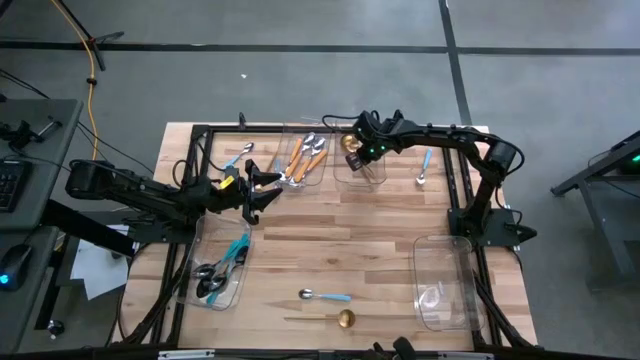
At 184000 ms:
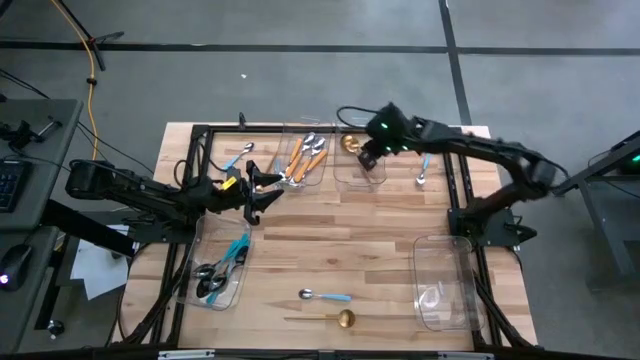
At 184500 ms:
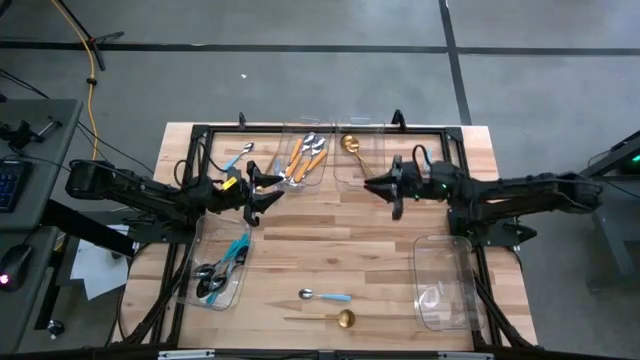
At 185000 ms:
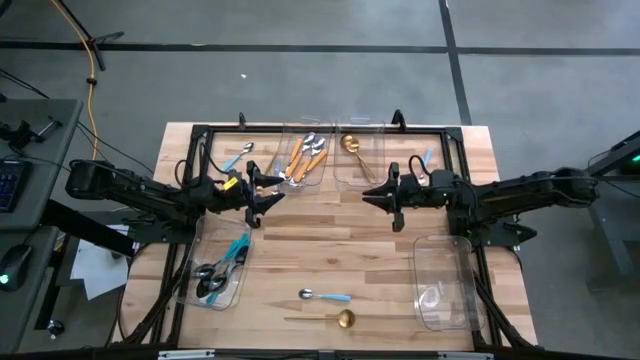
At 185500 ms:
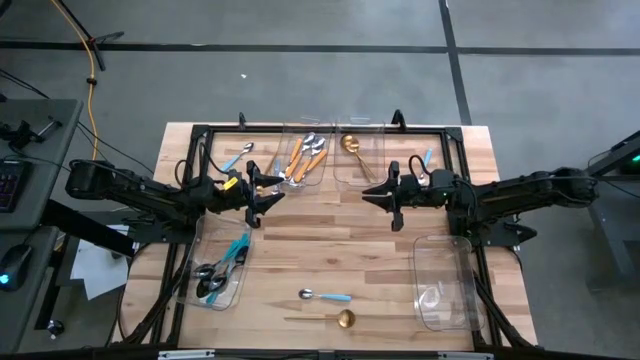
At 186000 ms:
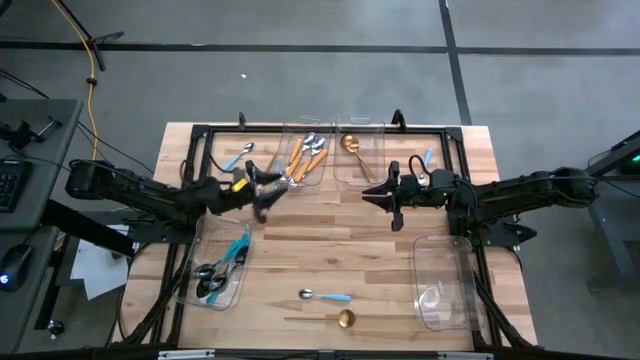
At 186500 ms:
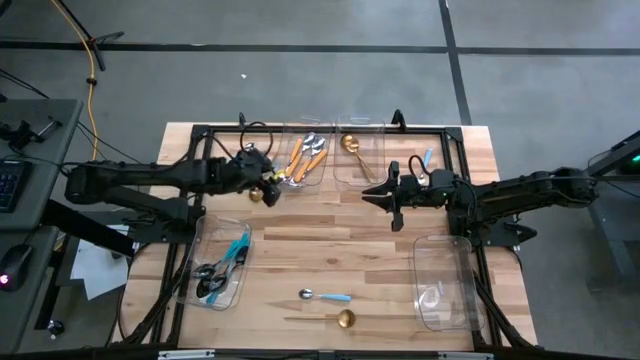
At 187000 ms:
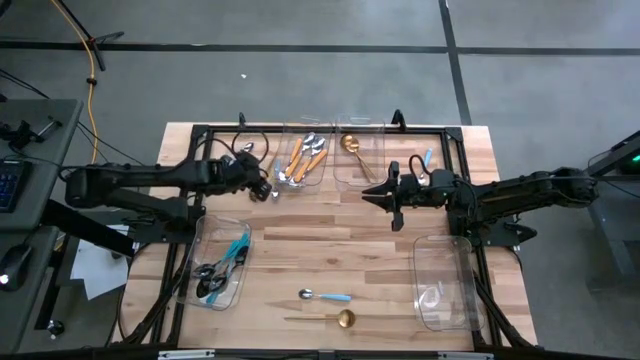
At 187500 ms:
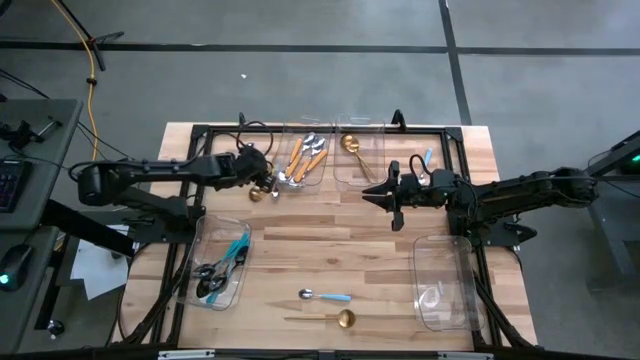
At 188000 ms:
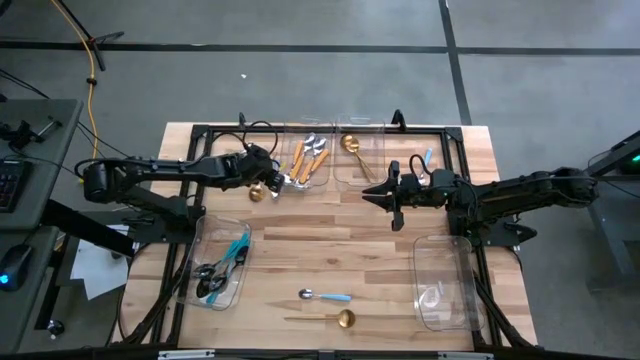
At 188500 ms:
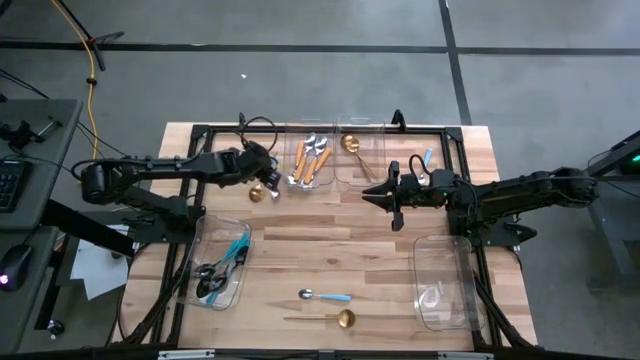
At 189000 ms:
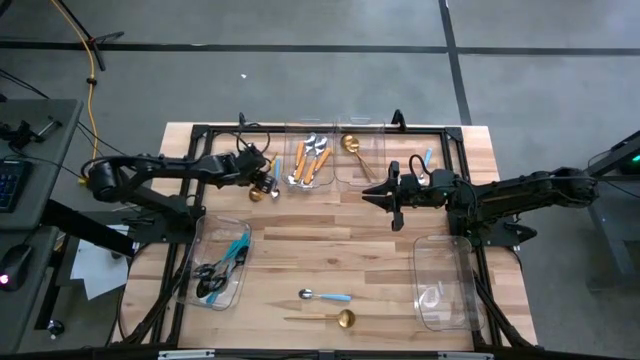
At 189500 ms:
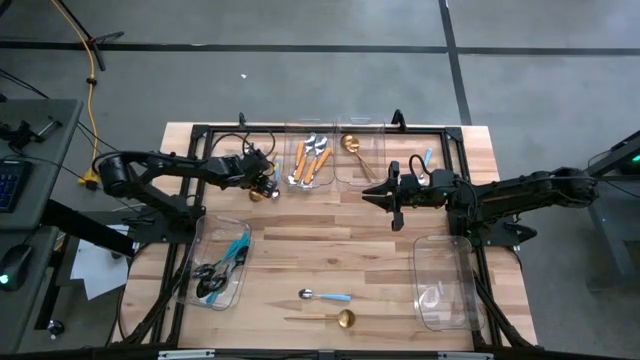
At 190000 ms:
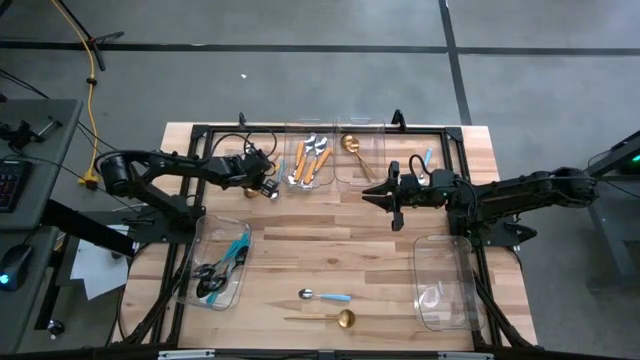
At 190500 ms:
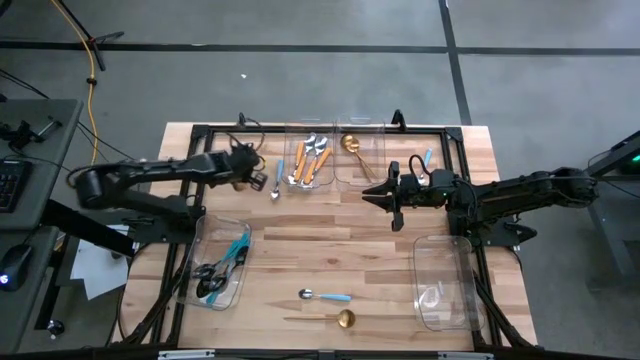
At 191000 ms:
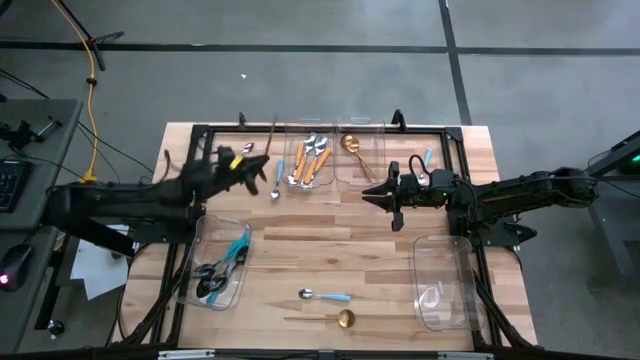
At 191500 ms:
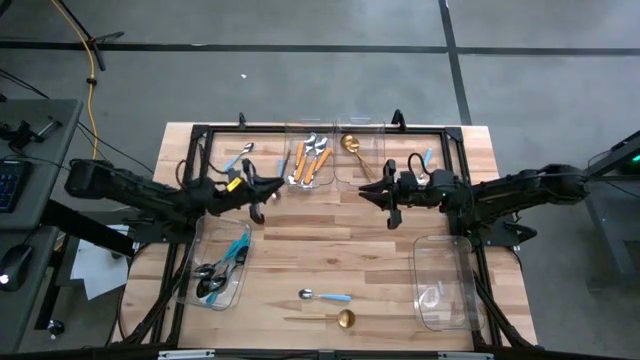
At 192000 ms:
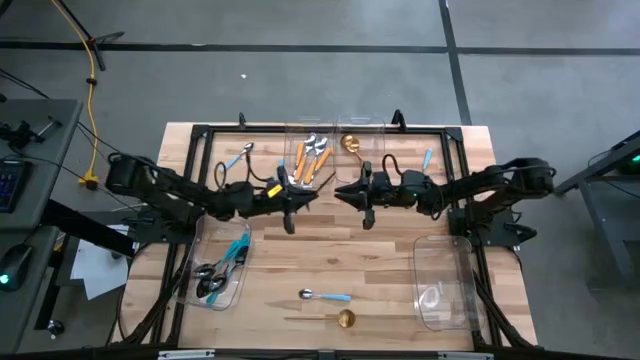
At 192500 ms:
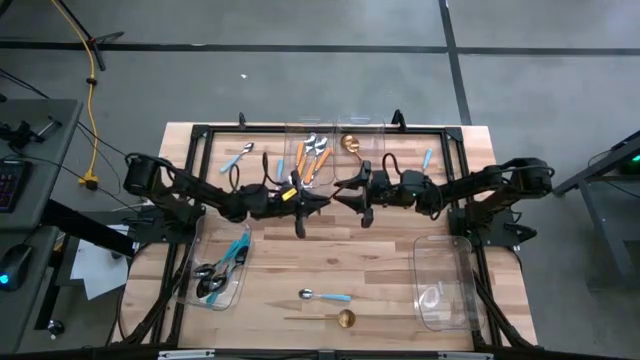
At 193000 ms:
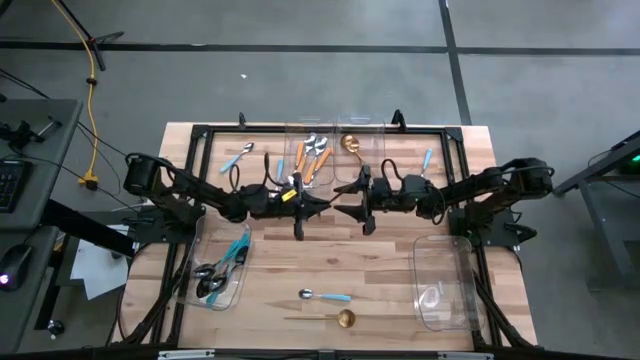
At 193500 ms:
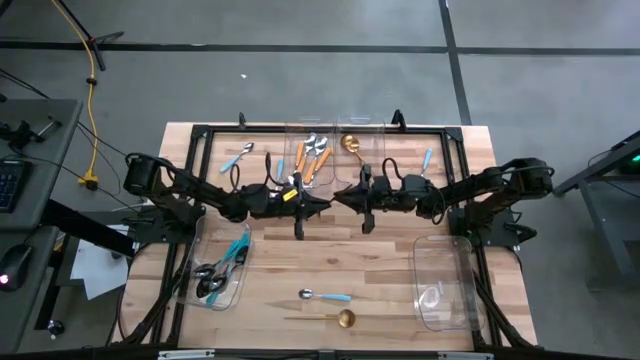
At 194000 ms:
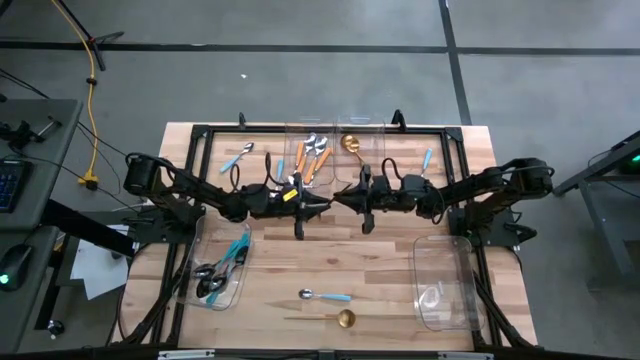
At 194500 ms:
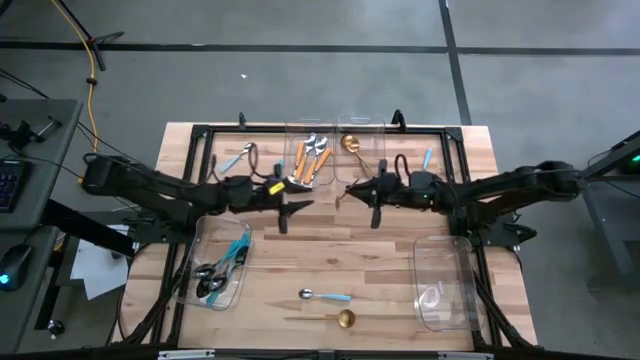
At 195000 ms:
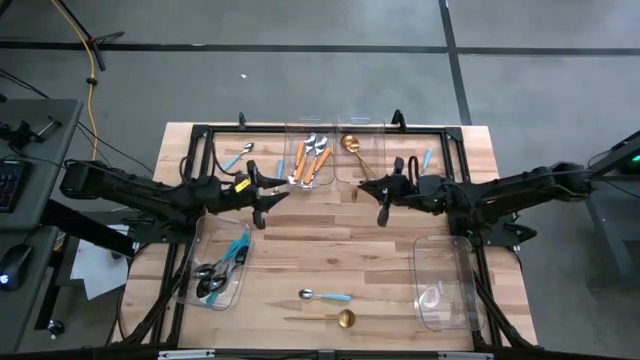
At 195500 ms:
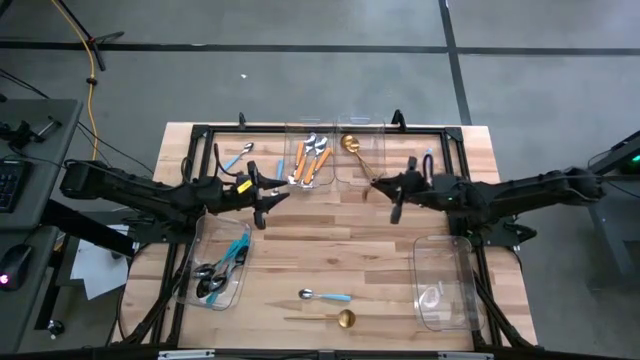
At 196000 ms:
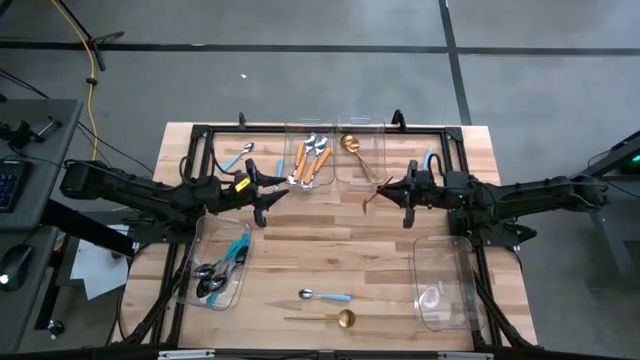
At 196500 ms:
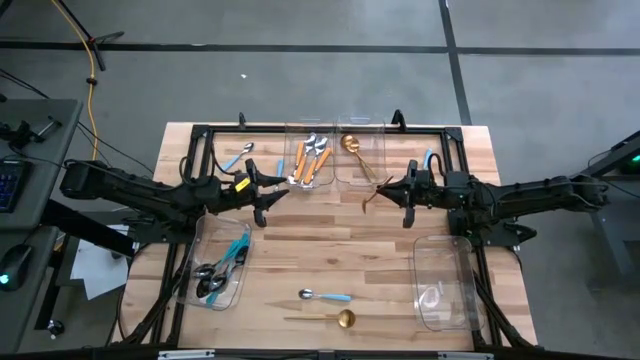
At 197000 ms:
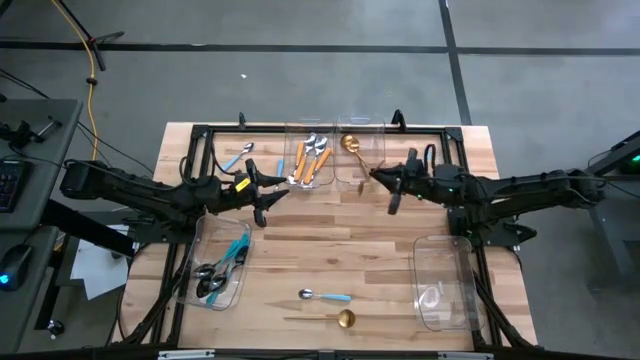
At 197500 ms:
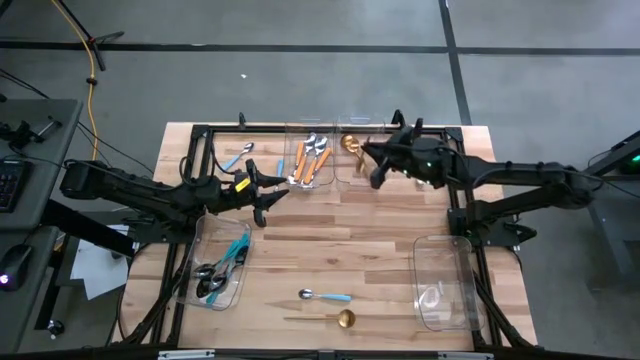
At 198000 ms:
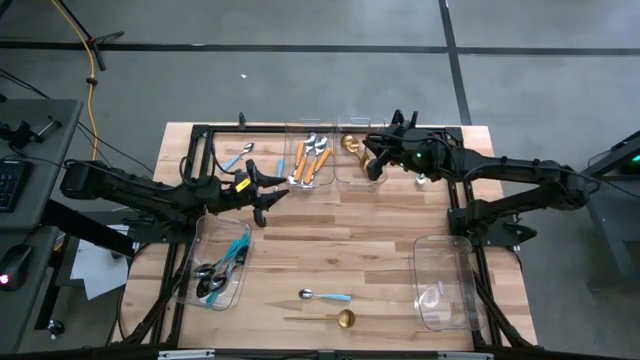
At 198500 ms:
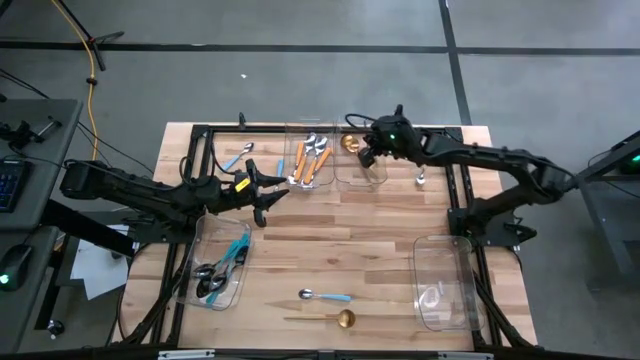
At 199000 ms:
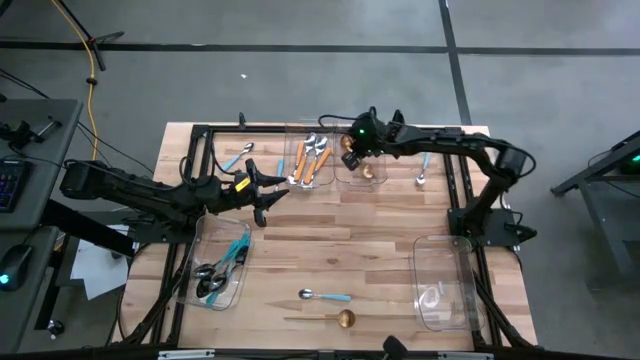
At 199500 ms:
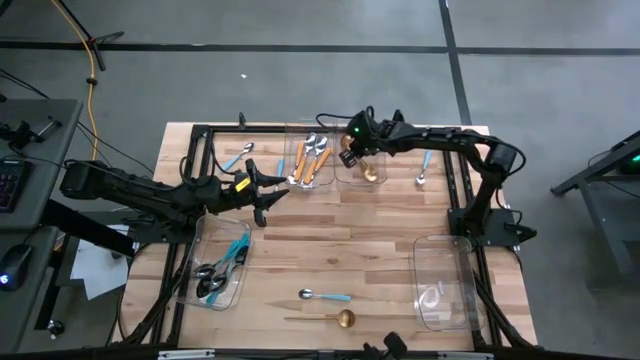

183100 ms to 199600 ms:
Task: Sort silverware by color (type)
Put the gold spoon into the top right transparent bin
